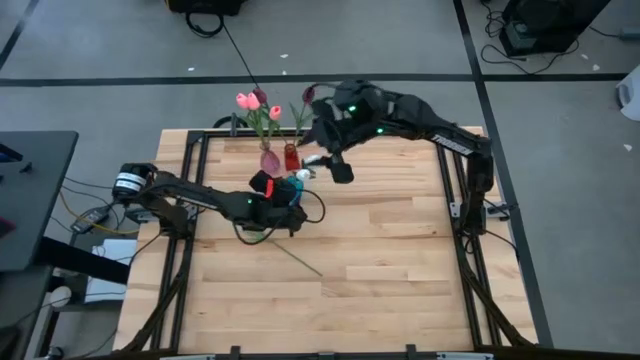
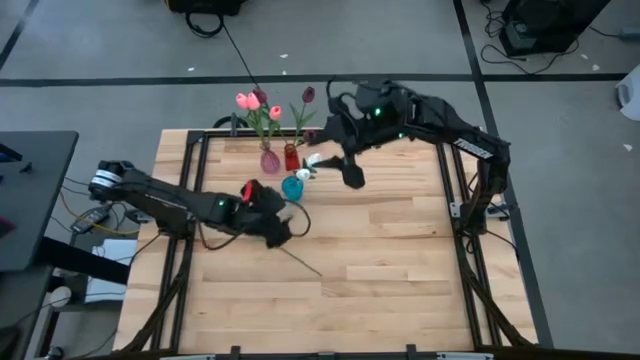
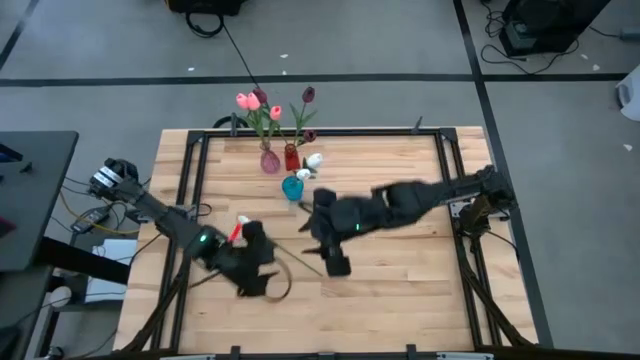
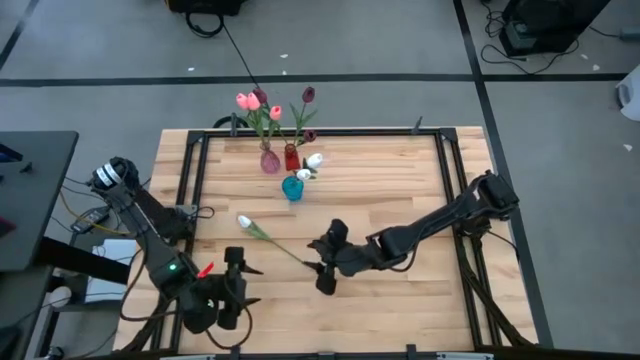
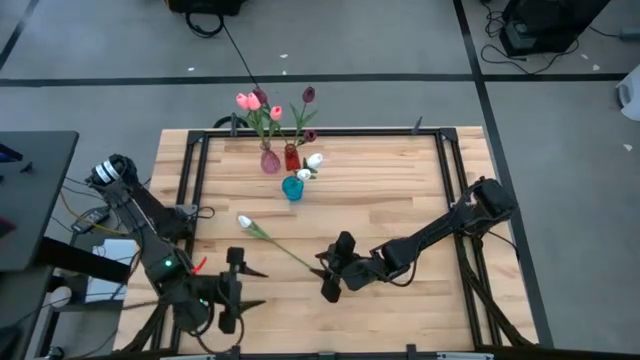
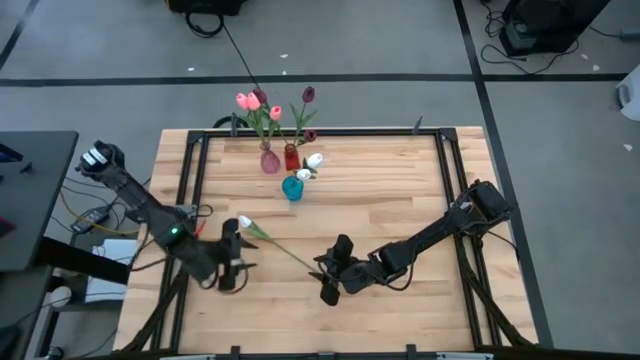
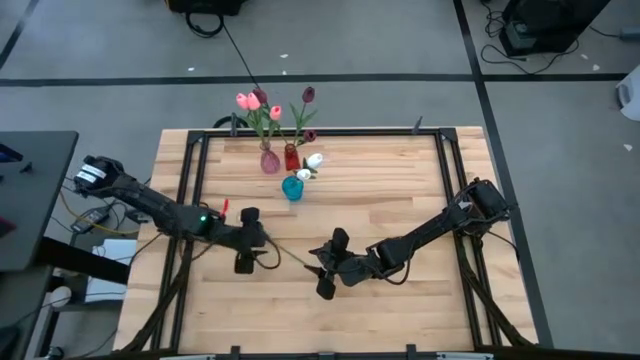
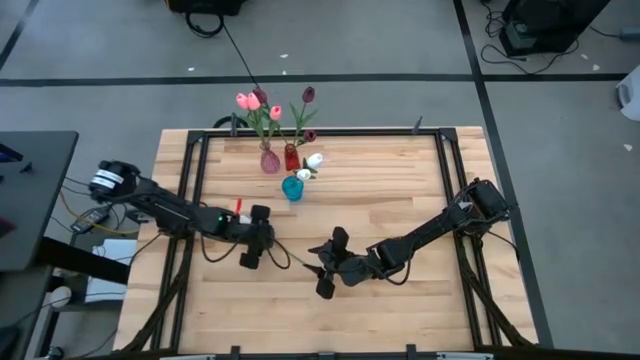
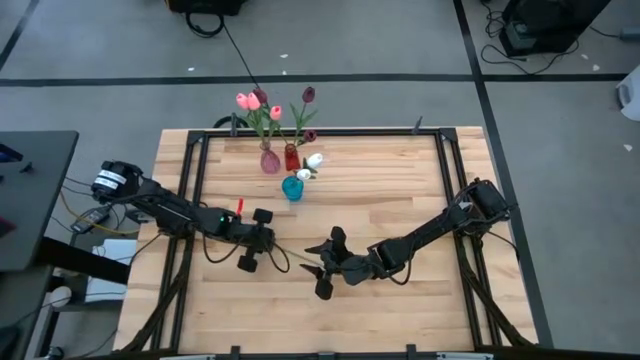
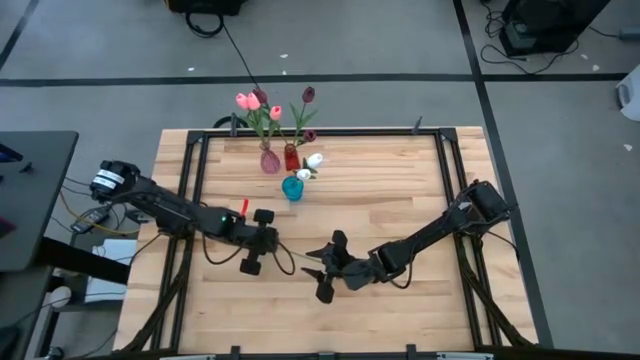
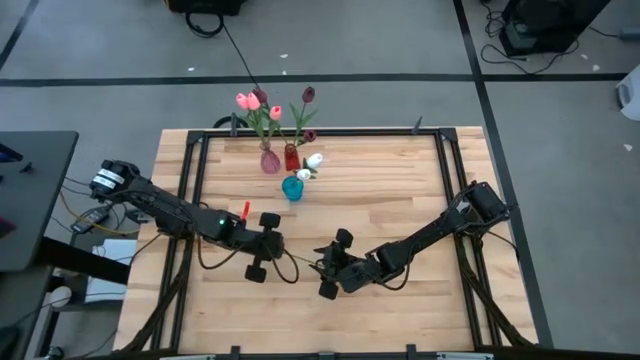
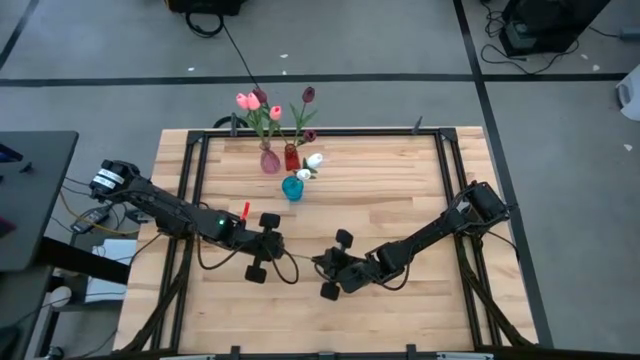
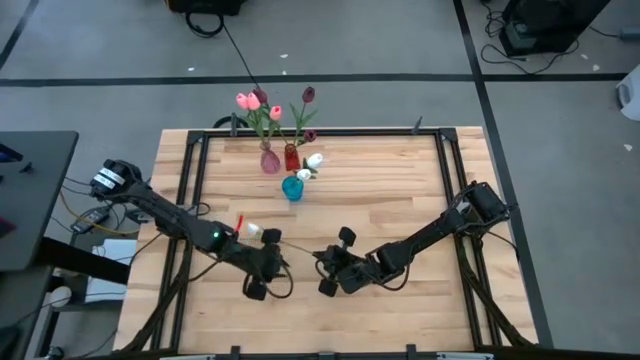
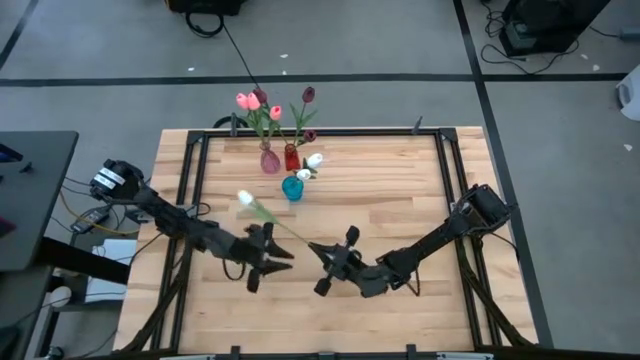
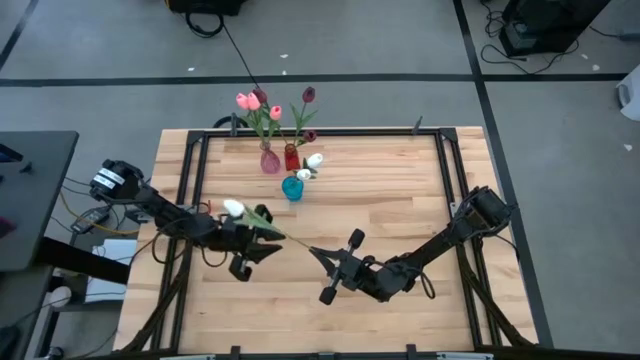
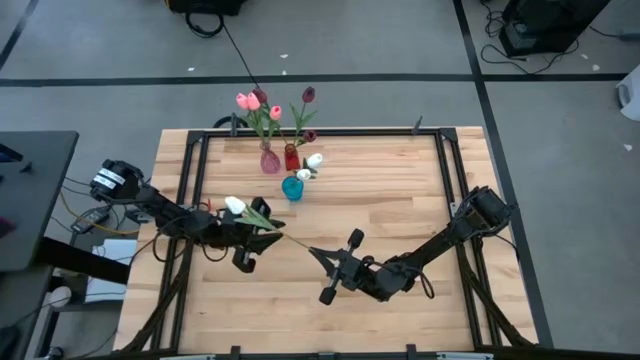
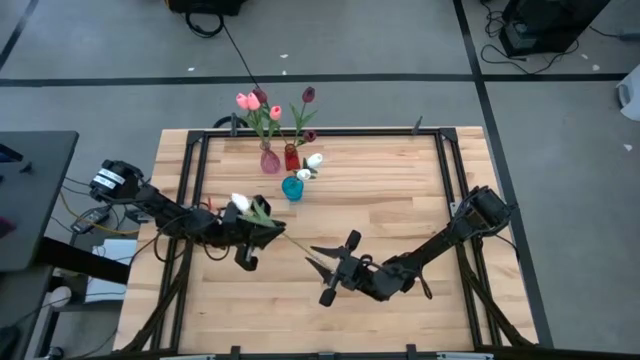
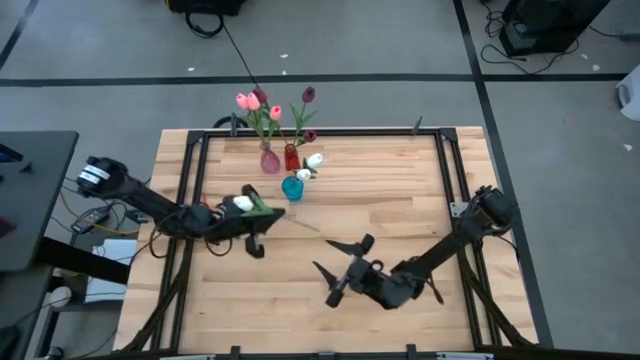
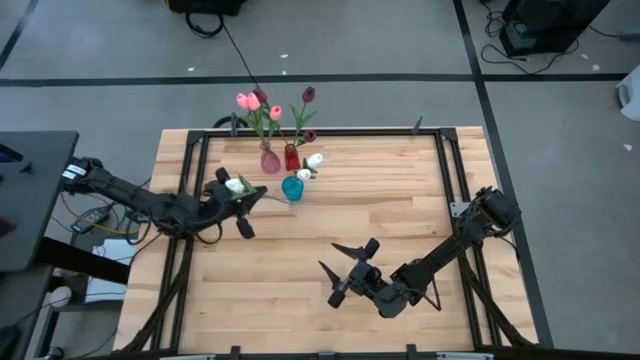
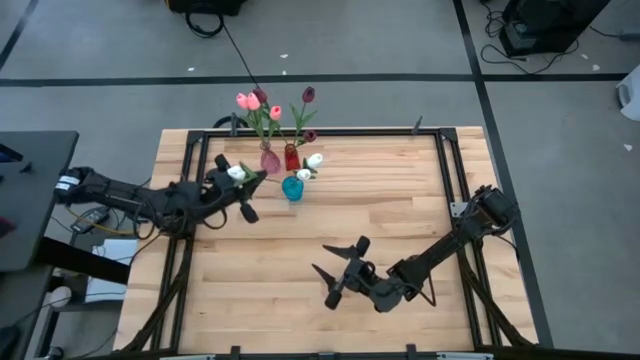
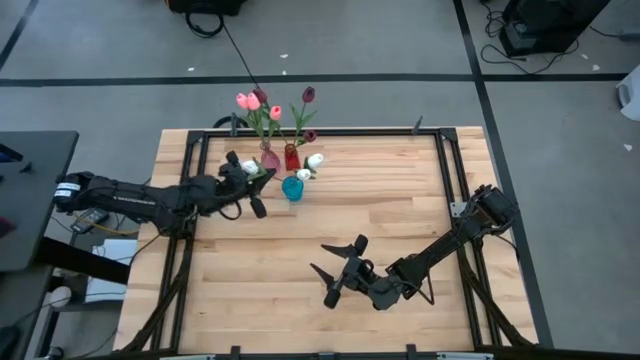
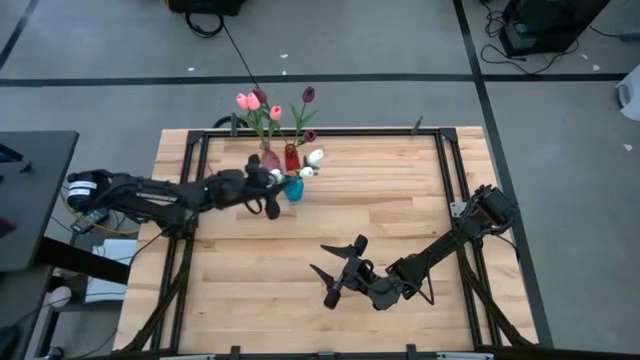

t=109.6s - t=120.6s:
Task: Sort flowers into vase by color
Put the white flower into the blue vase

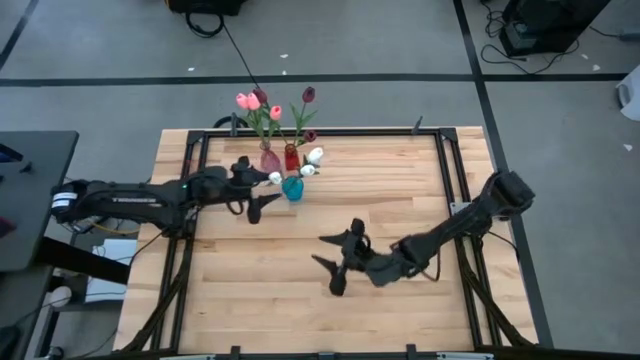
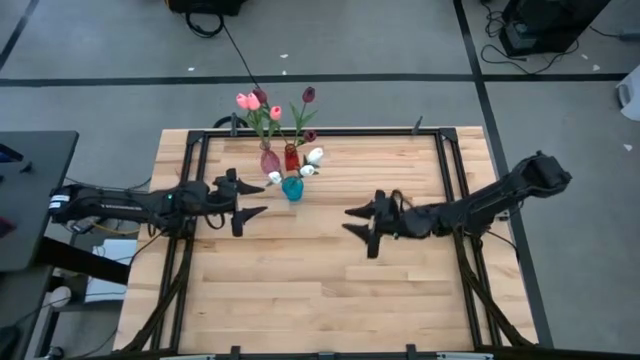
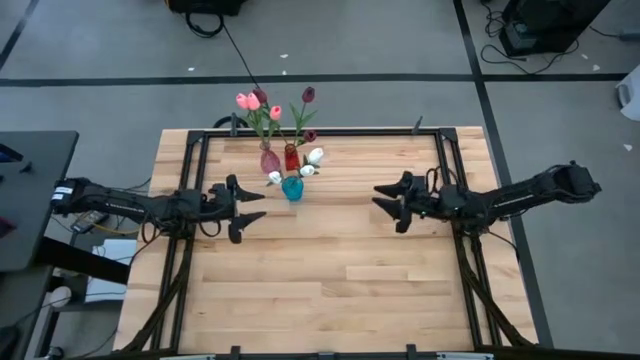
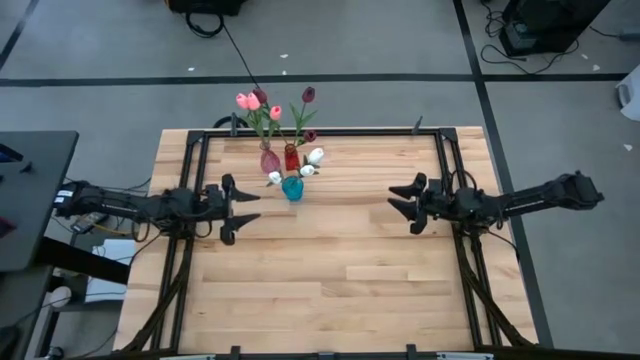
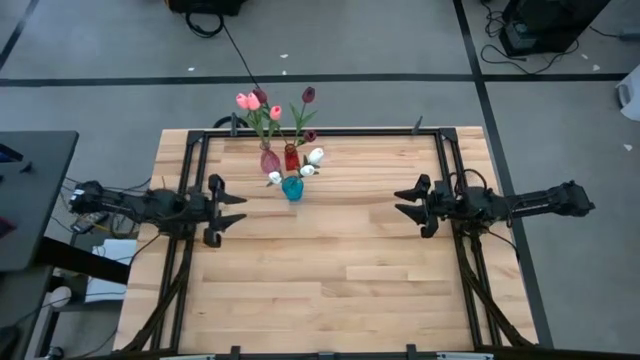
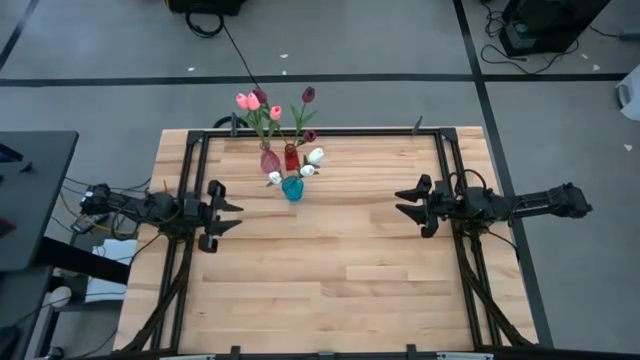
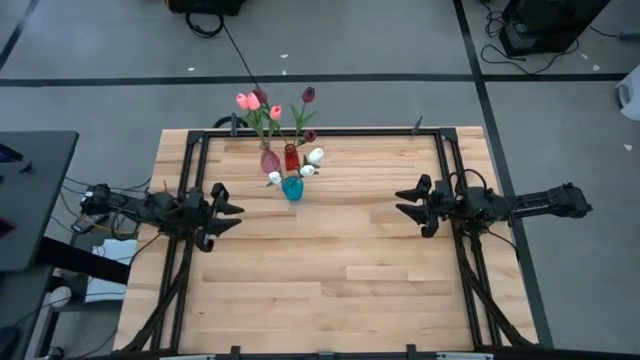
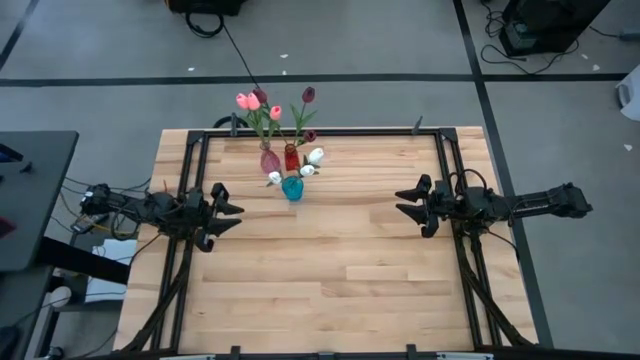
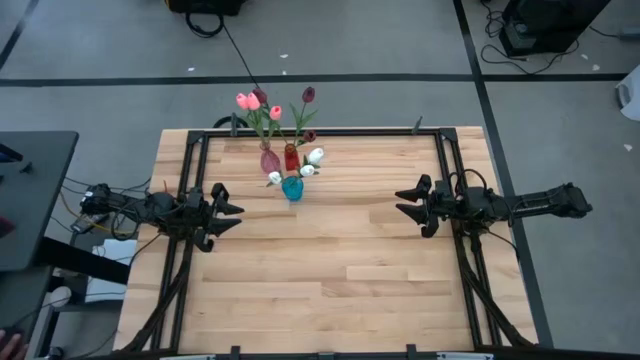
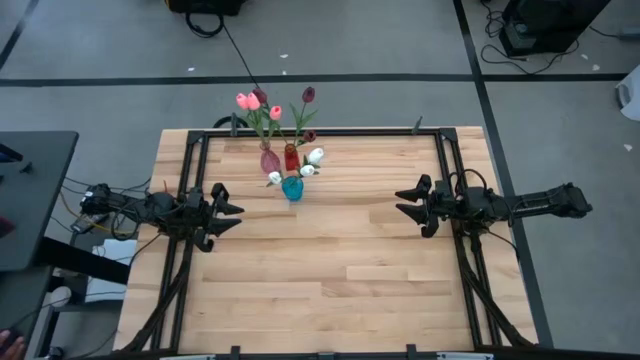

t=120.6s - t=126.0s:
Return to Home Position

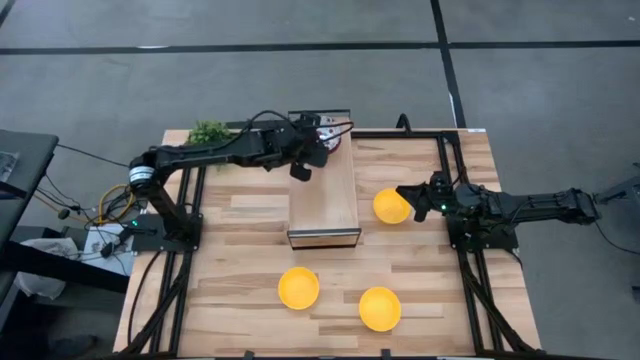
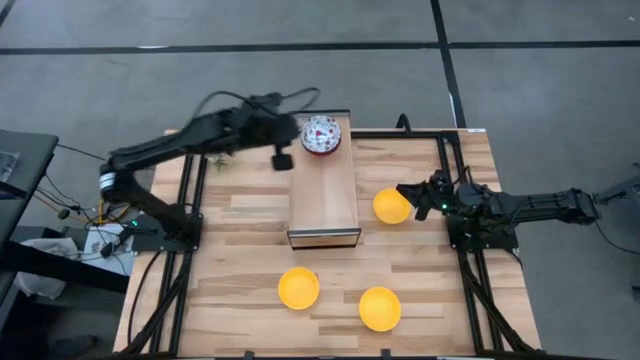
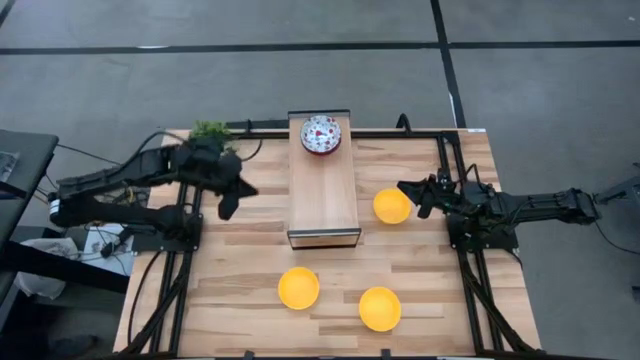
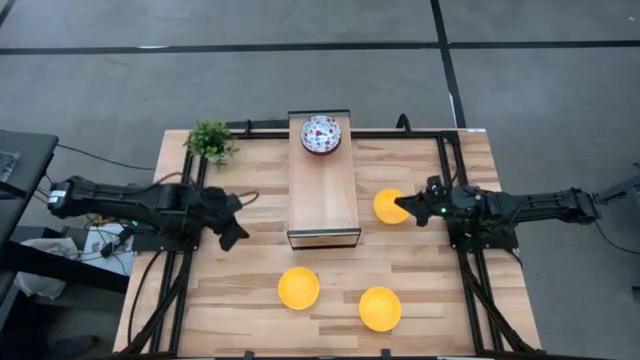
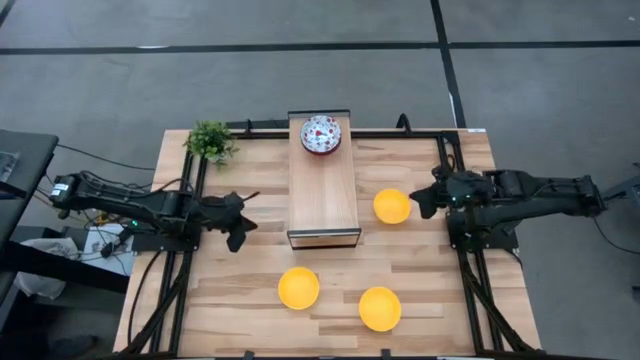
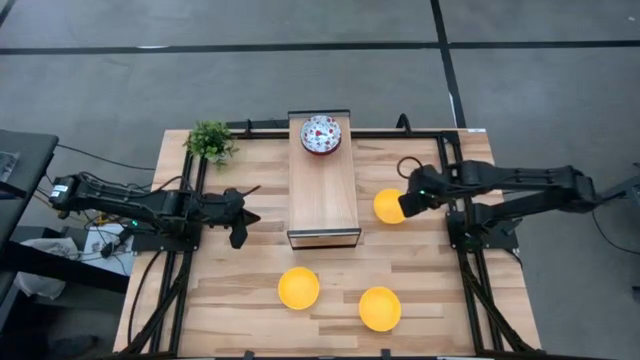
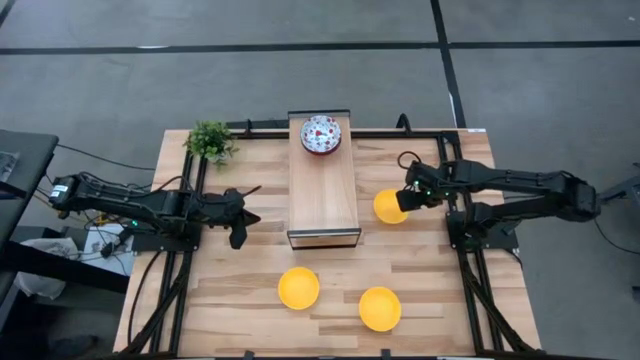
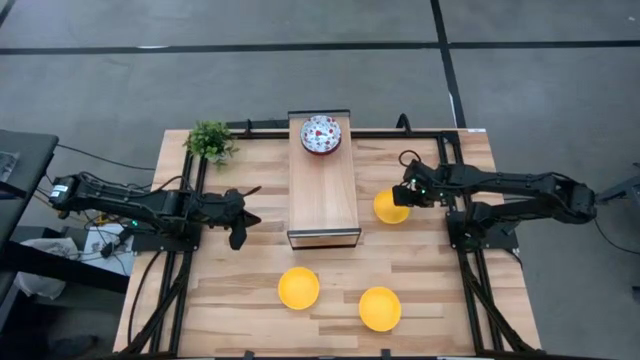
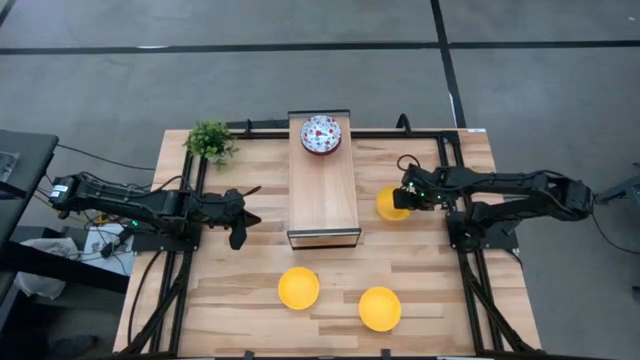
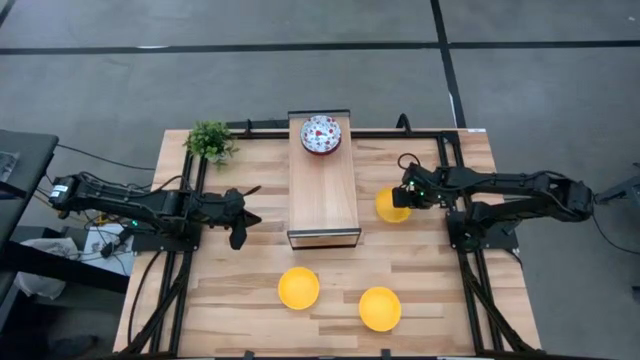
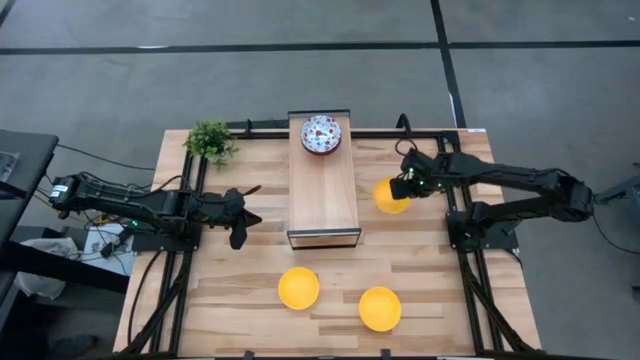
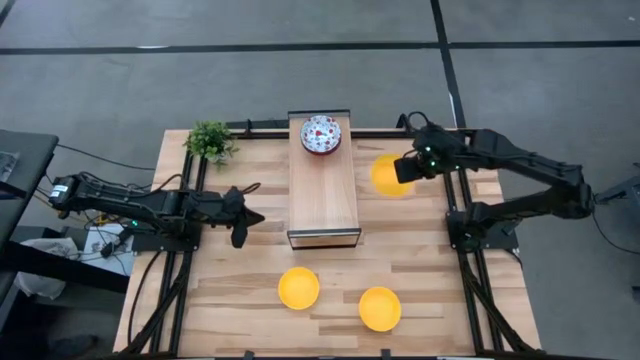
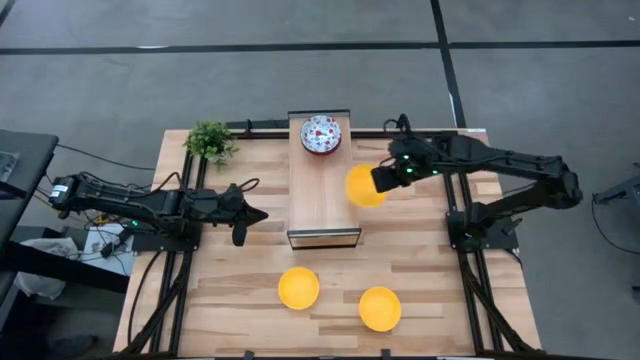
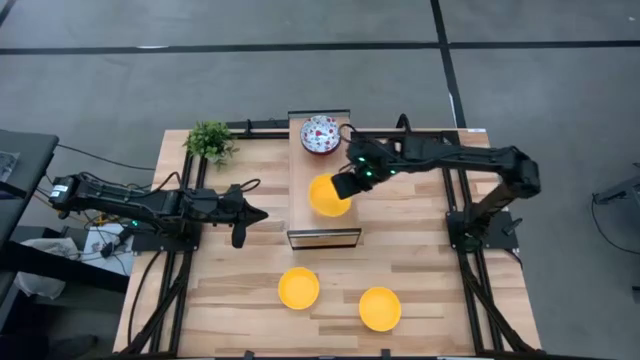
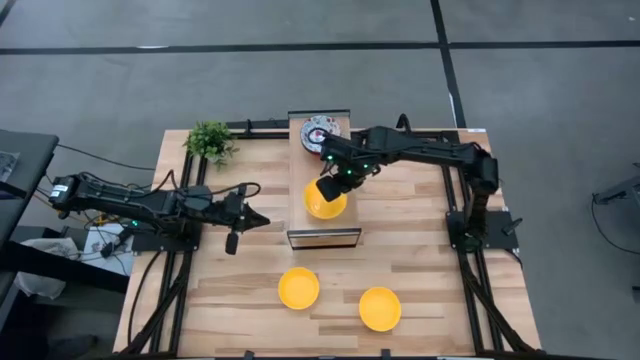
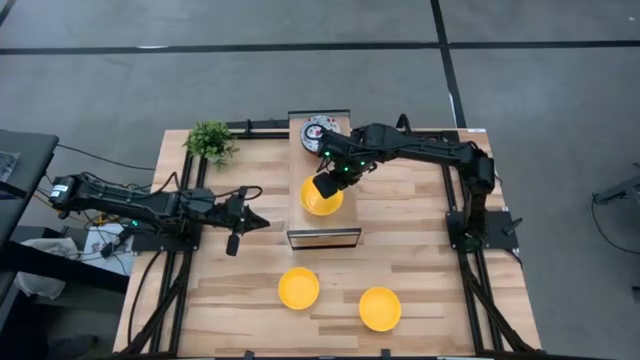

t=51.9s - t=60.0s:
Task: Pick & Place Mini bowls
Put the top yellow bowl on the shelf
